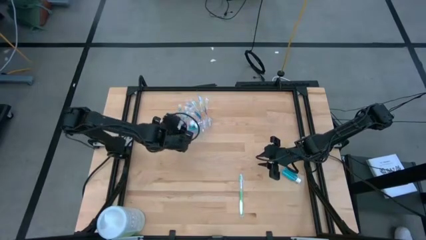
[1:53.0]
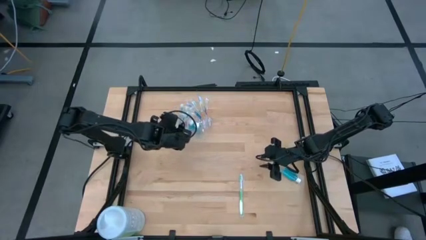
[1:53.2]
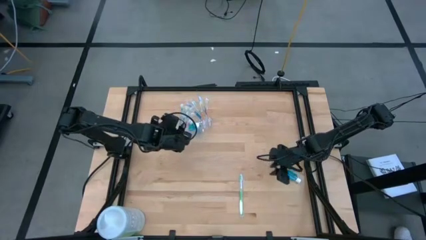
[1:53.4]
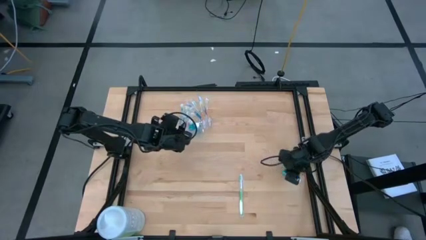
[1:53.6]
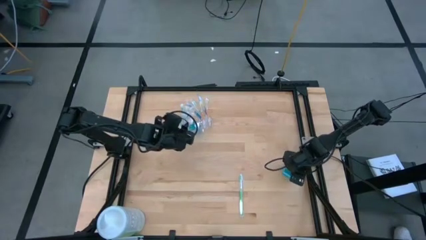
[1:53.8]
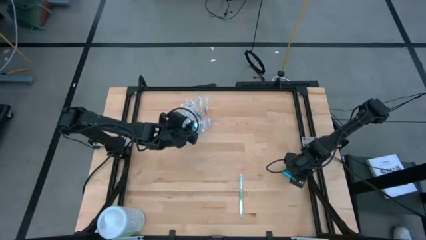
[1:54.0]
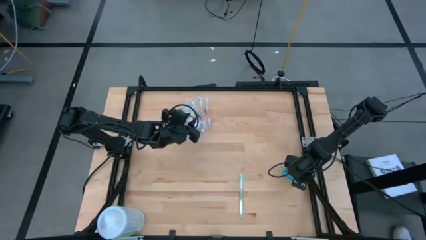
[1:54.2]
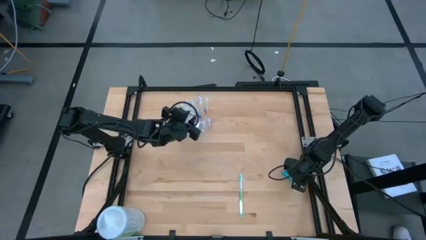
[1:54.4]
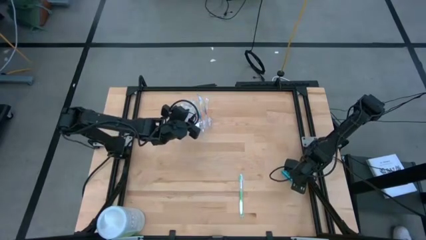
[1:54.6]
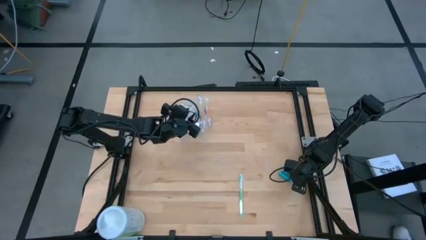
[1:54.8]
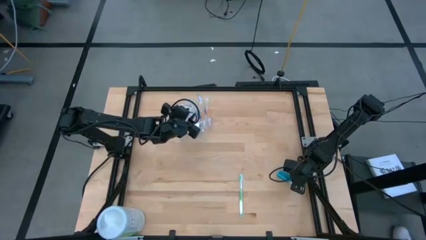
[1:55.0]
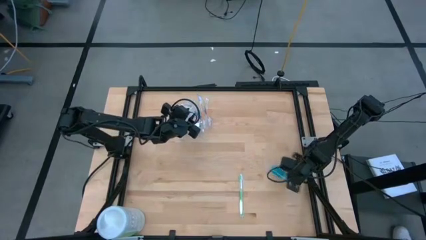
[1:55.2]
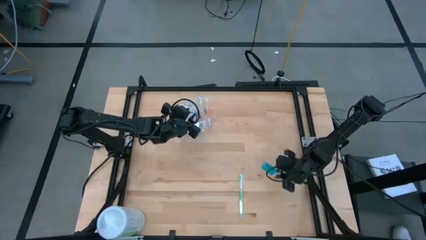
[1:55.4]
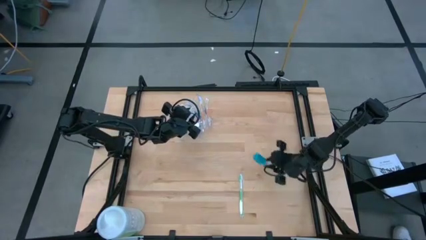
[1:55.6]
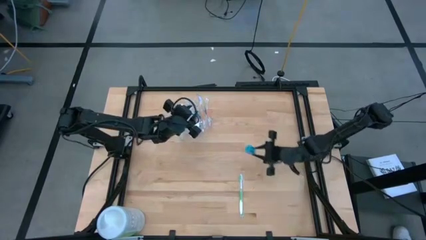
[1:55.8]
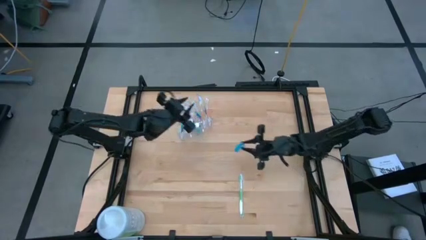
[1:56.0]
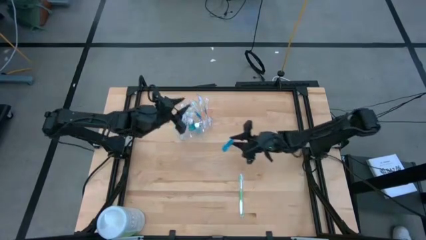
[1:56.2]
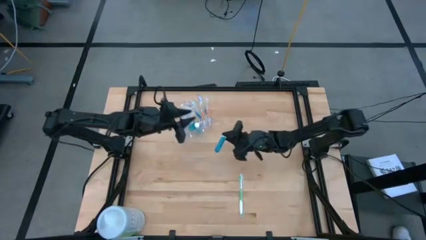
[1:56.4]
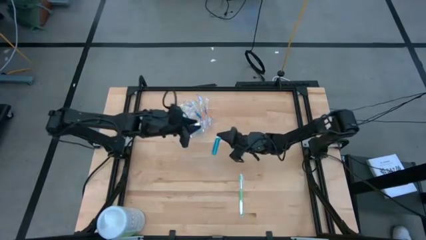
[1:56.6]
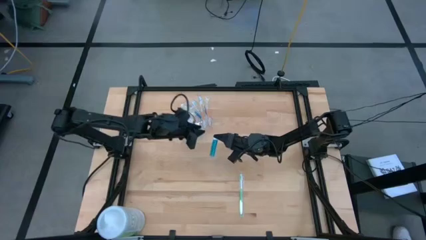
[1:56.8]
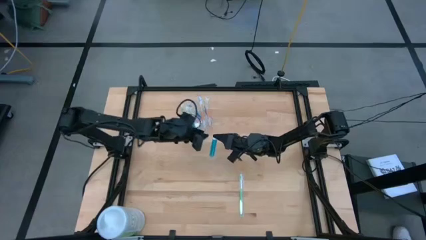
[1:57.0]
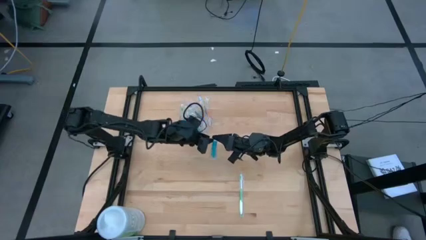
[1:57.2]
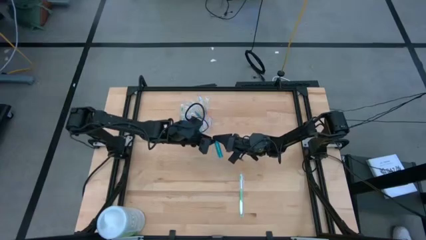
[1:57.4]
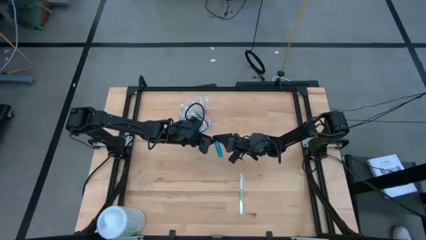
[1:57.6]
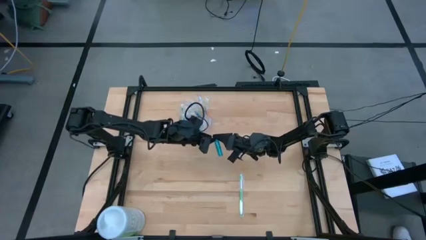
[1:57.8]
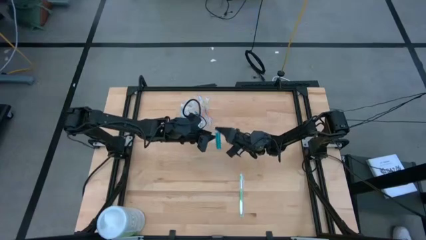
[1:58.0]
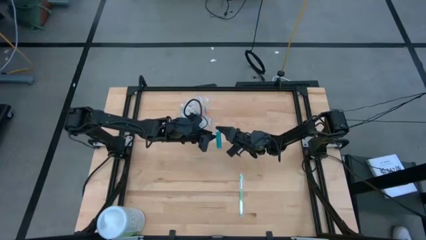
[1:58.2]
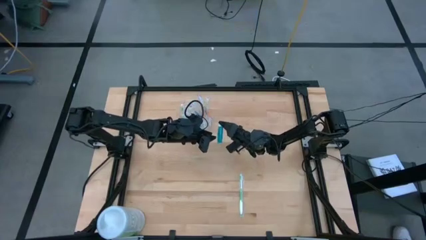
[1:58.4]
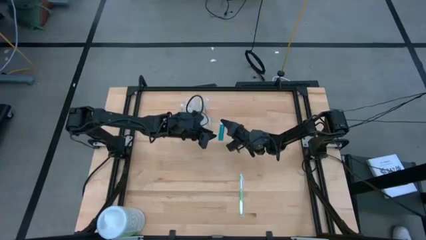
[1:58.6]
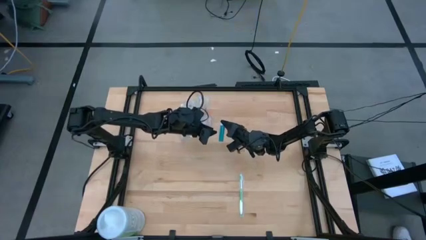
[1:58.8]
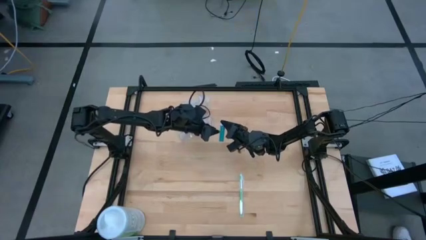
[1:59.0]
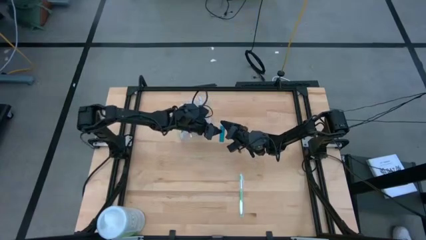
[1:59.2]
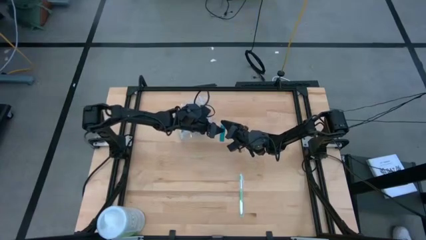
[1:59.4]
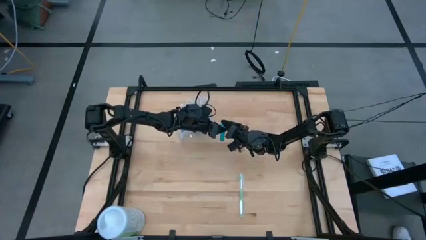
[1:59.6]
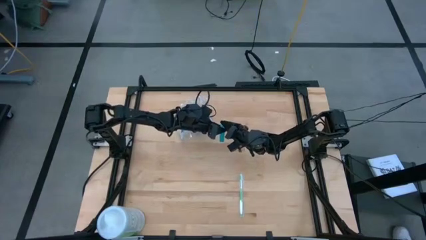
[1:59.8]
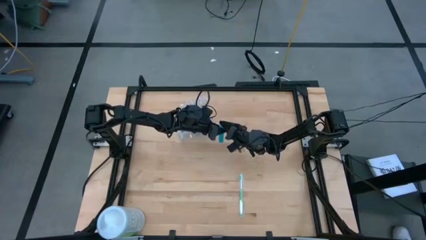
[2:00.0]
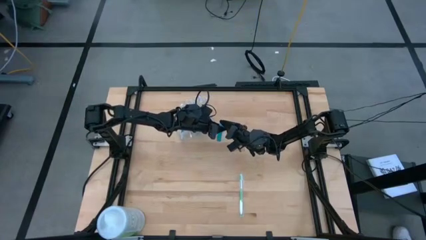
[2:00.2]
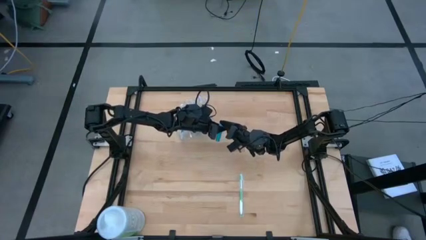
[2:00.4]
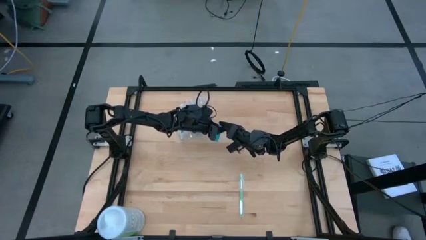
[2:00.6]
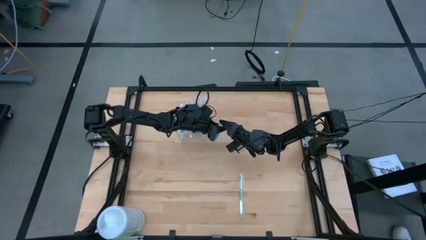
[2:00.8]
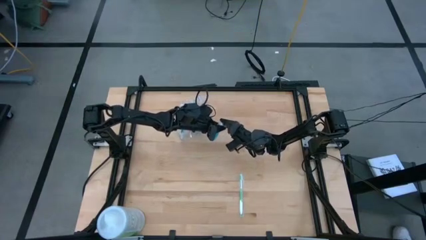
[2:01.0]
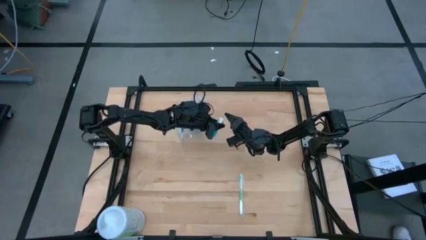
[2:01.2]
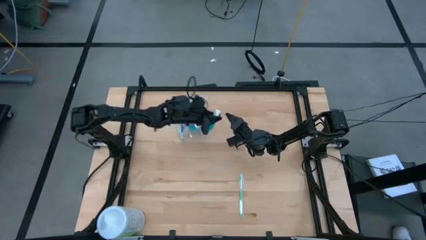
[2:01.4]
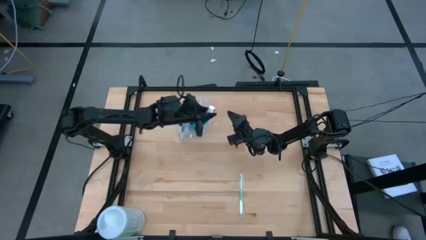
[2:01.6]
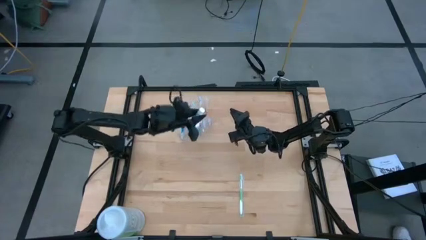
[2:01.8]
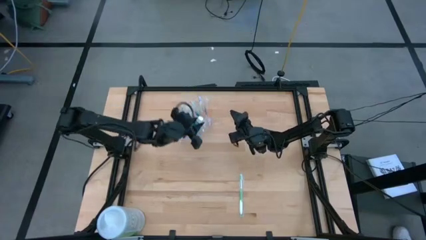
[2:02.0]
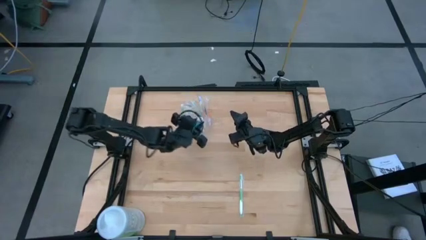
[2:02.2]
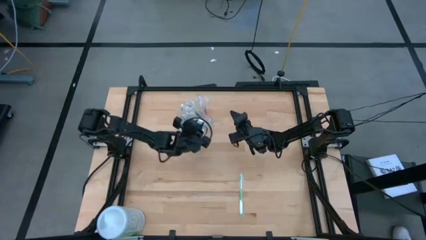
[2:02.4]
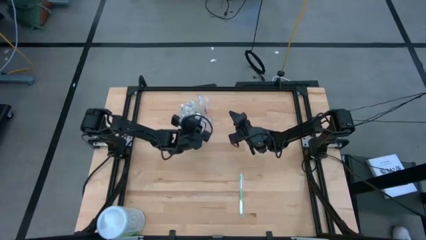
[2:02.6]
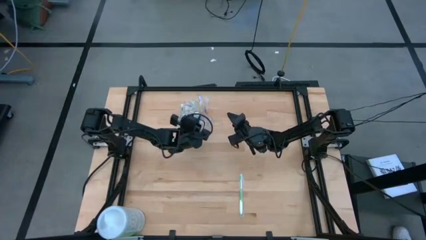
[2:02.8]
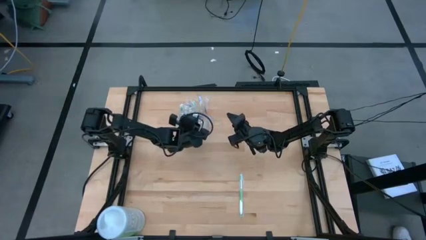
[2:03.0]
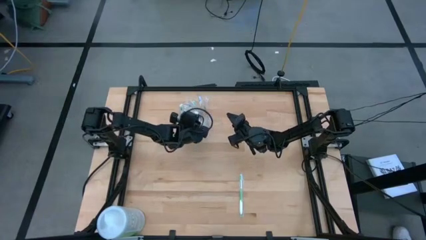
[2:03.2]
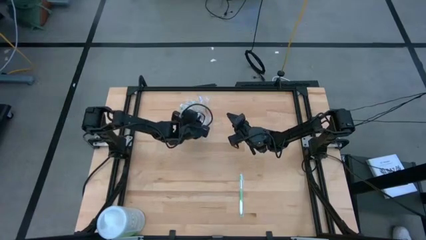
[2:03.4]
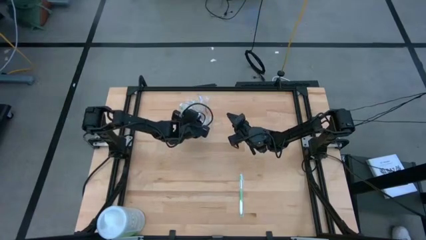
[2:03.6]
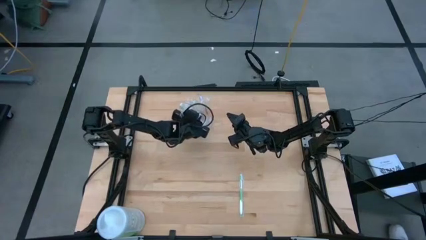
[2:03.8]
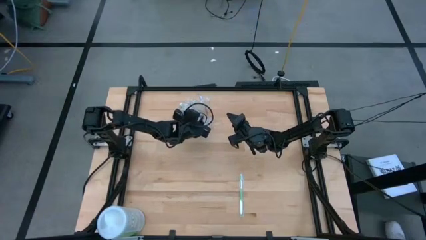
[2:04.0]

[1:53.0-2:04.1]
Task: Pick & Place toothbrushing station
Put the blue mouthwash into the transparent organizer

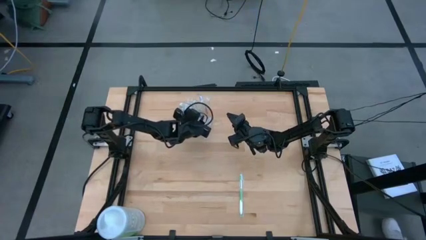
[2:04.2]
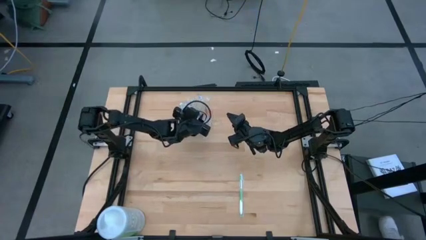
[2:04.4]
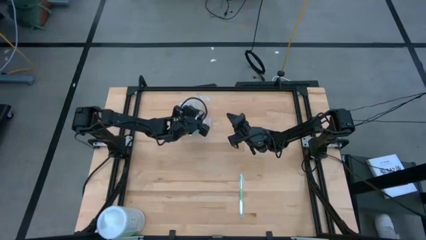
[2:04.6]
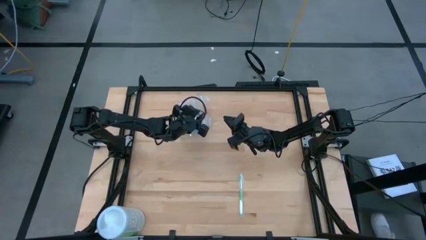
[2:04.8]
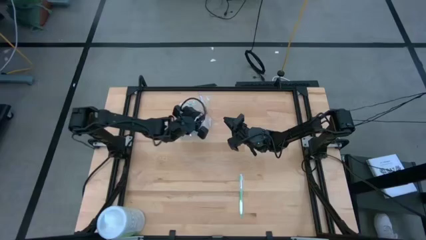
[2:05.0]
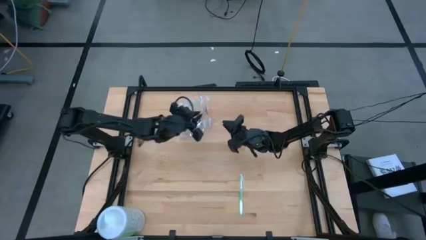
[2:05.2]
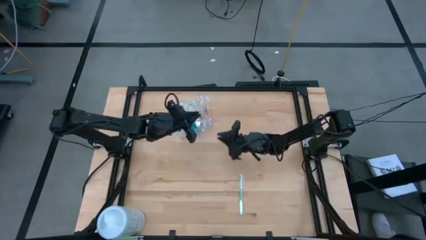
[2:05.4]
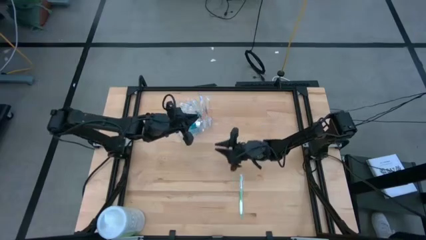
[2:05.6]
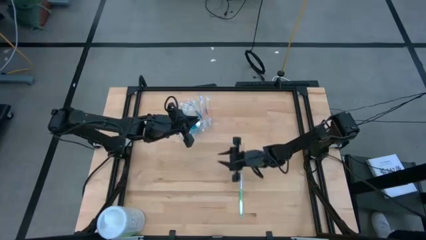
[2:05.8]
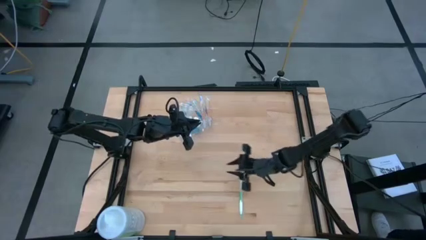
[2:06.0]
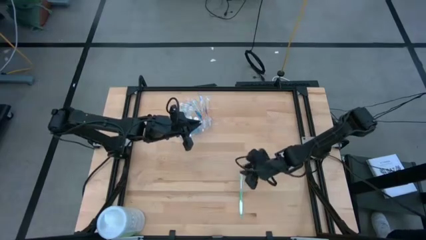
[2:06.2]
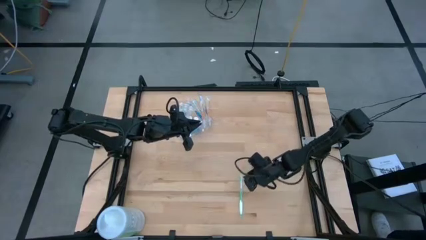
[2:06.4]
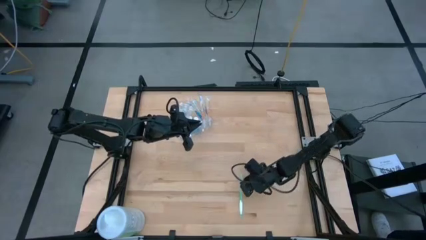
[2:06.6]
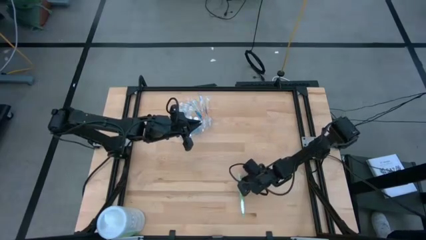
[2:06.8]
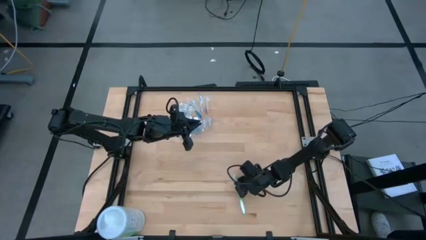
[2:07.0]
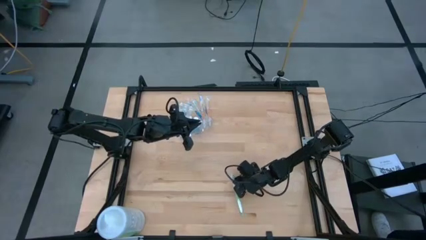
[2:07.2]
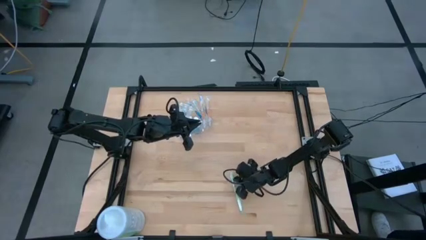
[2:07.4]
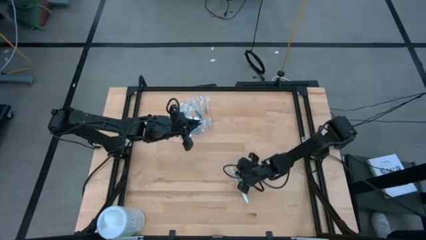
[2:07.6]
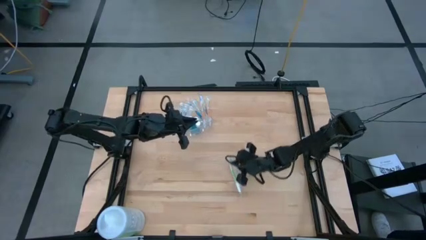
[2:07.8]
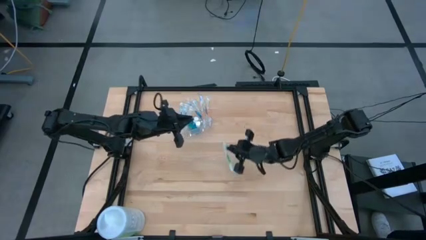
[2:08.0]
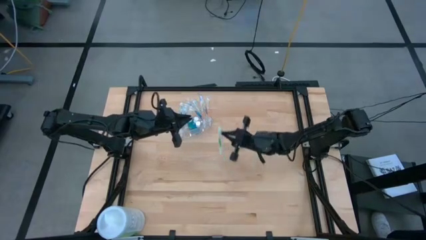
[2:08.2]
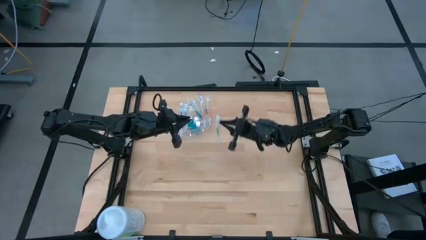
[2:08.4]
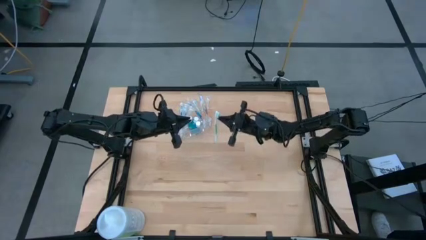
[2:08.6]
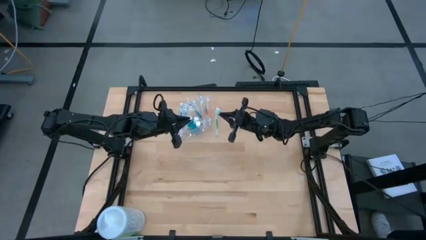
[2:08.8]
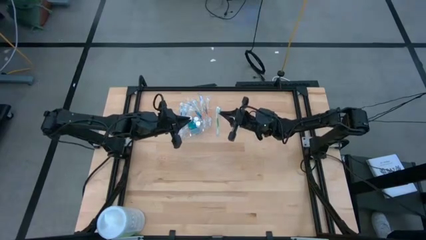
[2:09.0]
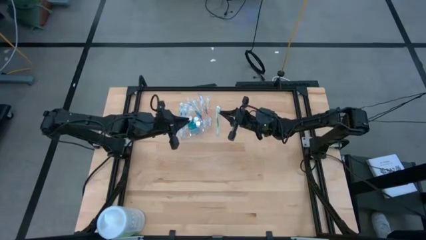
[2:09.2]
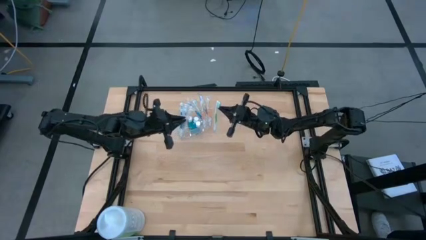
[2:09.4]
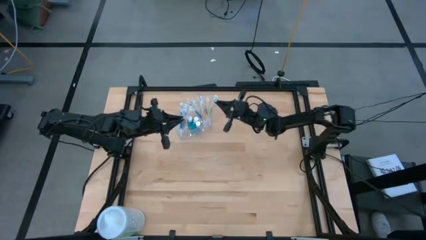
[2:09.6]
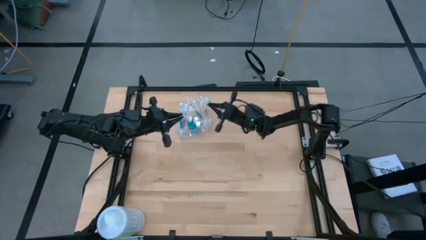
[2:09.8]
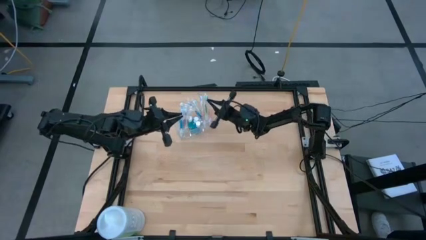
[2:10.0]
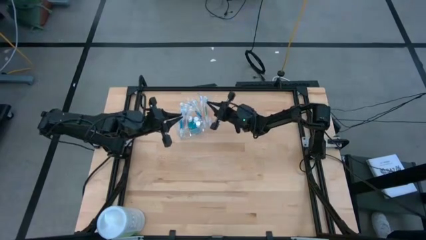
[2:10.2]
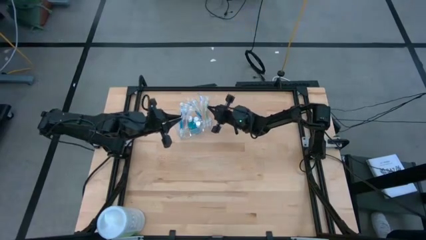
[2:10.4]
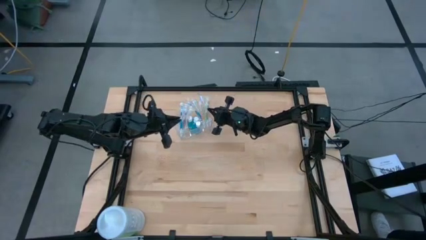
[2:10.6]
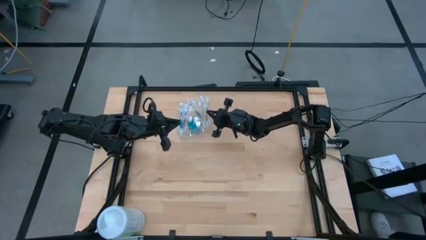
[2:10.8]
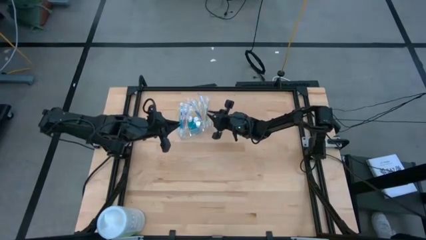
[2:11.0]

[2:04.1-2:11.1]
Put the green toothbrush into the transparent organizer
